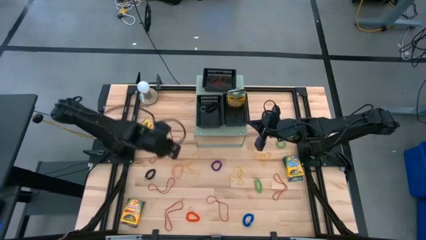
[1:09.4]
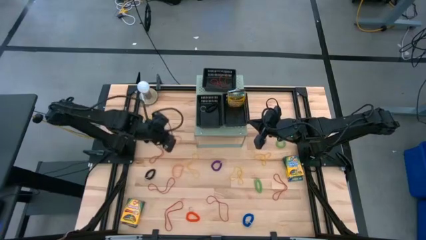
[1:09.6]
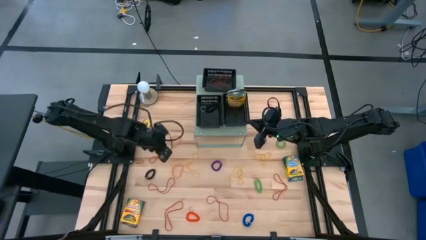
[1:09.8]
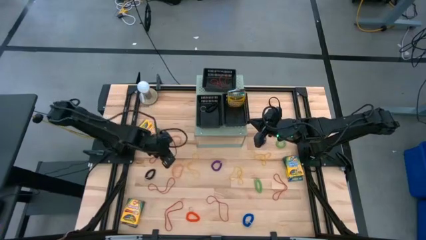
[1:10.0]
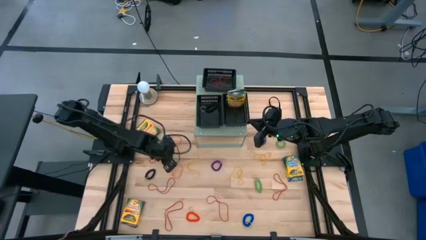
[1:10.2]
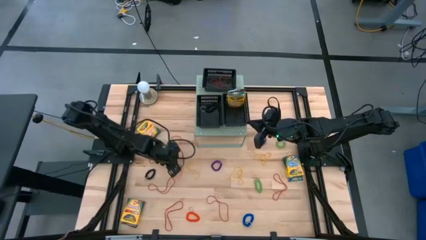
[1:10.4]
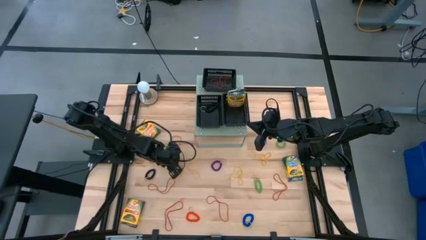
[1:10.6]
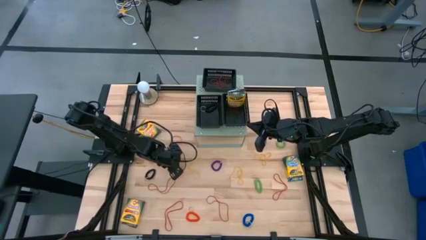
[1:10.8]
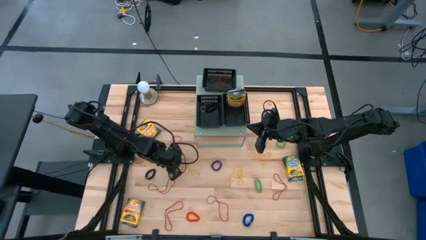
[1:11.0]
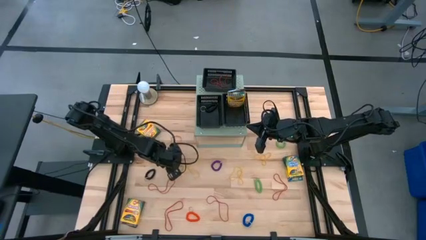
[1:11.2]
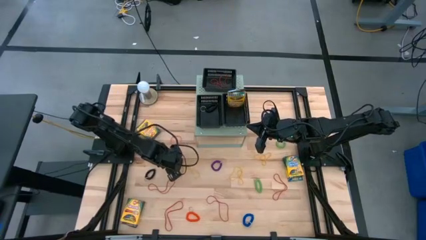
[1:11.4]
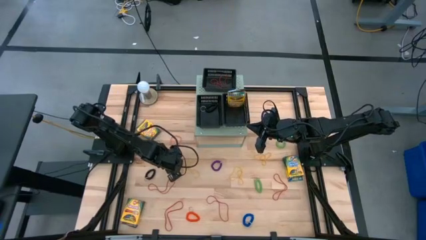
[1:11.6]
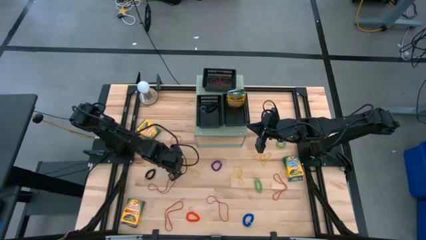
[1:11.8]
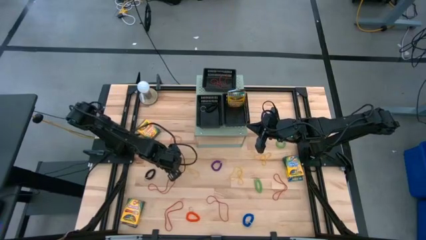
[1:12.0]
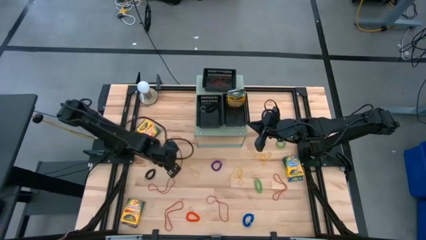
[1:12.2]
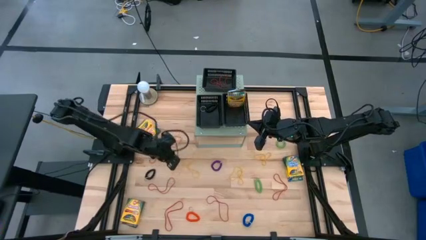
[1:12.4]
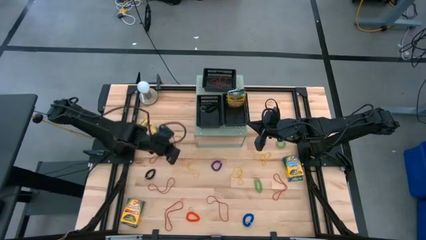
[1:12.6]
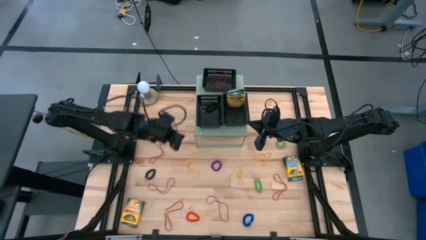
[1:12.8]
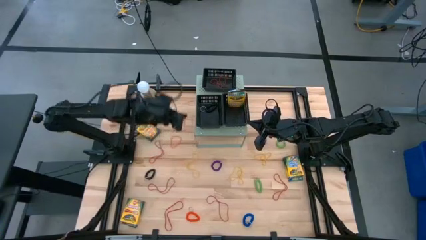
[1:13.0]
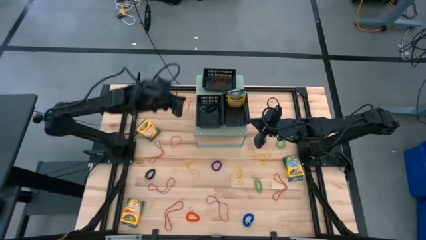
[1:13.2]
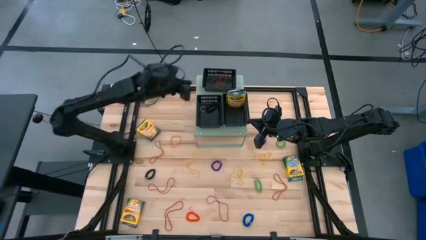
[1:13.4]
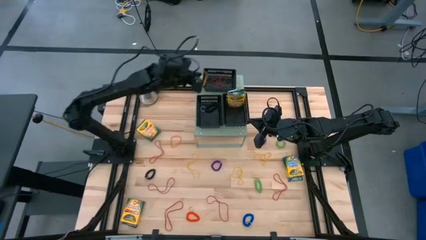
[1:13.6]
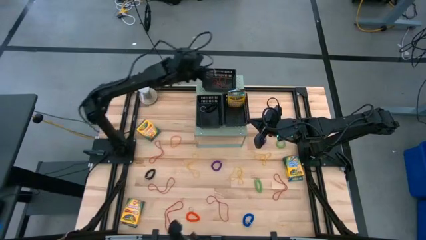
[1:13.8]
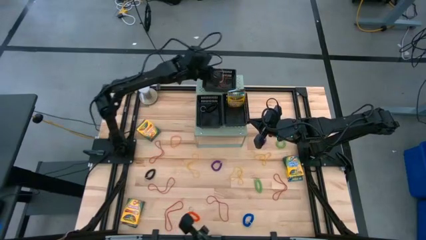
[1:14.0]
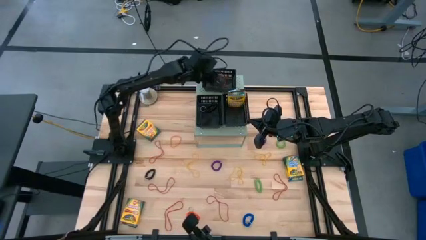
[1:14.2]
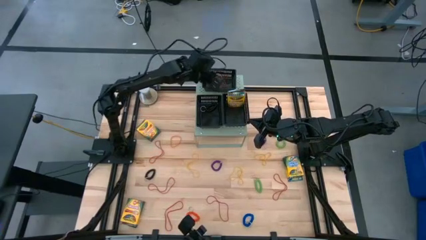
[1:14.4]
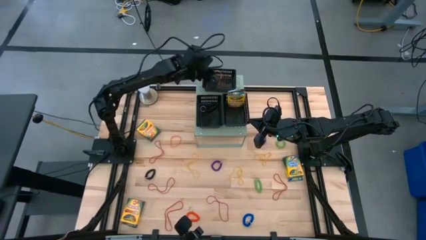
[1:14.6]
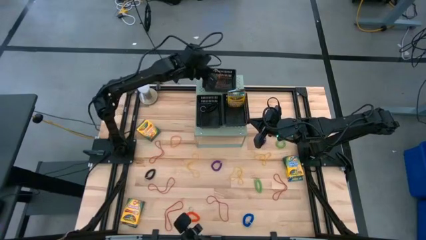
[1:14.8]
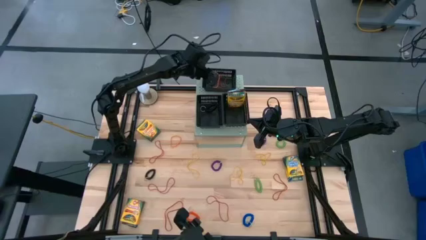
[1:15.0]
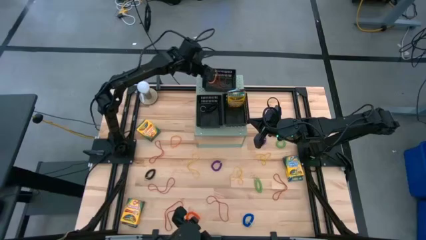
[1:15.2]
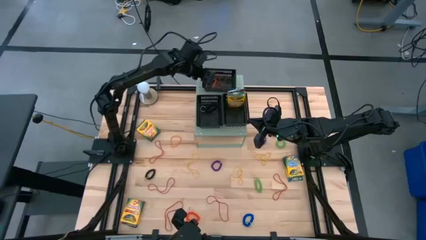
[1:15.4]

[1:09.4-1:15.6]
Task: Pick & Place Office Desk Supplies
Put the orange rubber band into the top black bin

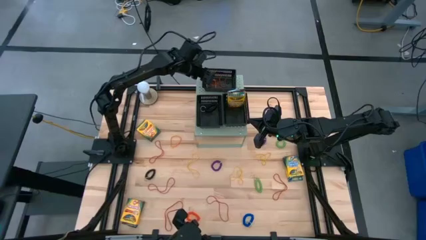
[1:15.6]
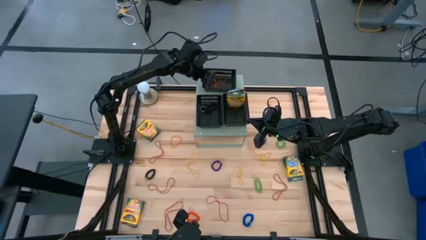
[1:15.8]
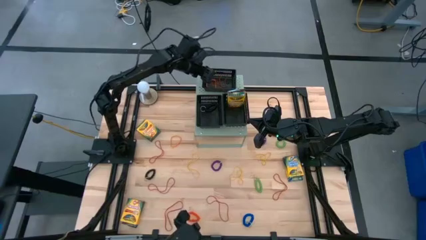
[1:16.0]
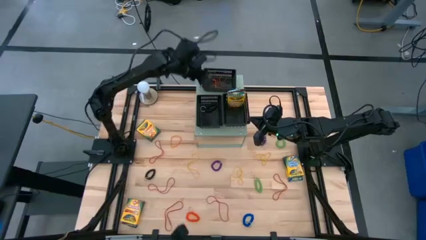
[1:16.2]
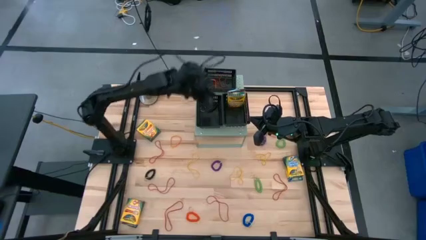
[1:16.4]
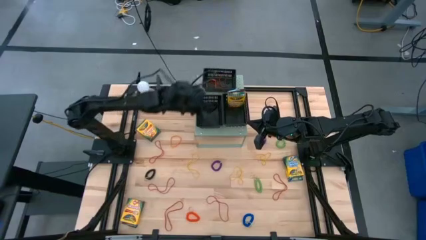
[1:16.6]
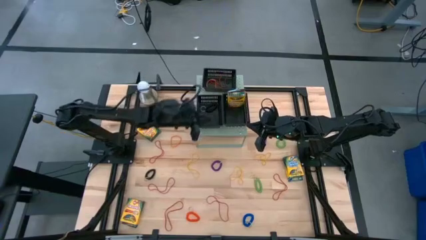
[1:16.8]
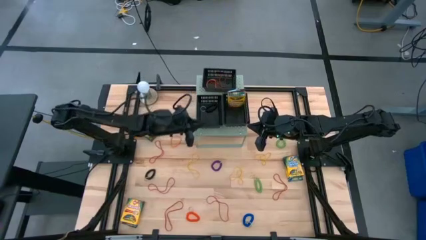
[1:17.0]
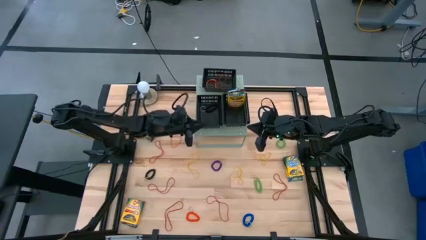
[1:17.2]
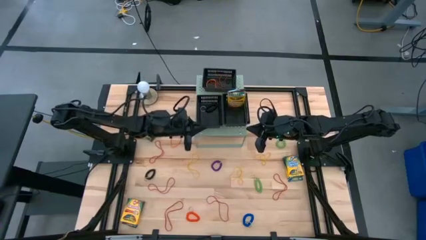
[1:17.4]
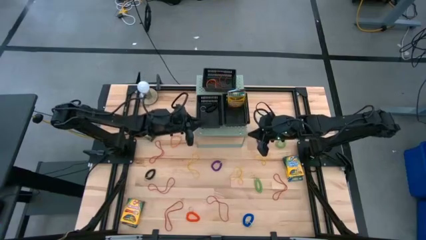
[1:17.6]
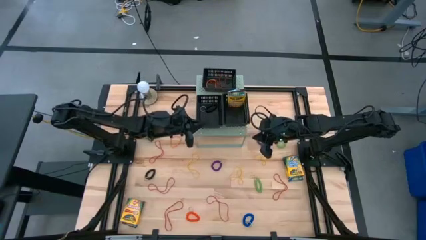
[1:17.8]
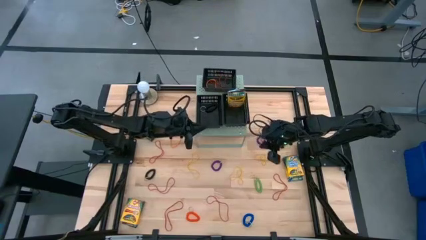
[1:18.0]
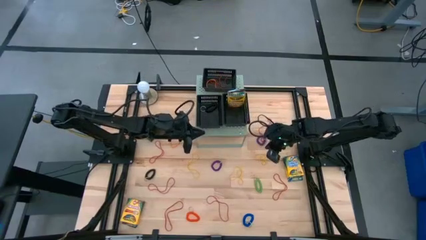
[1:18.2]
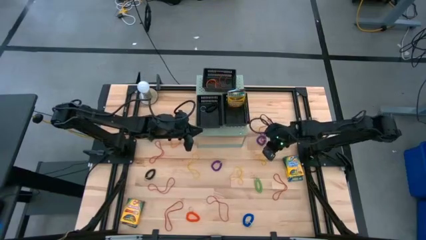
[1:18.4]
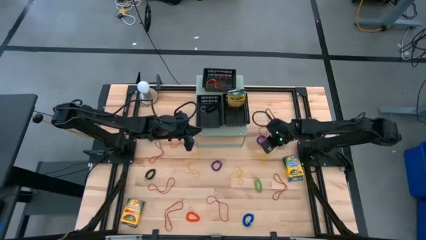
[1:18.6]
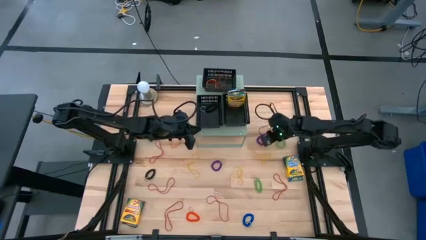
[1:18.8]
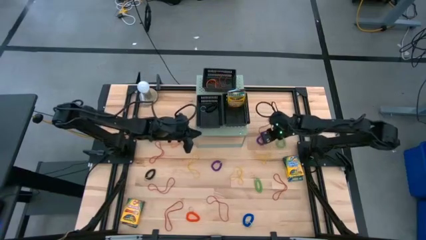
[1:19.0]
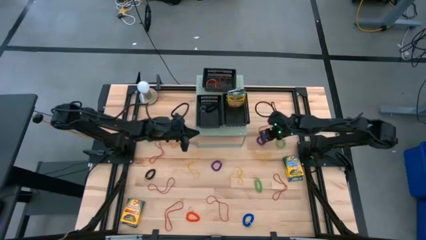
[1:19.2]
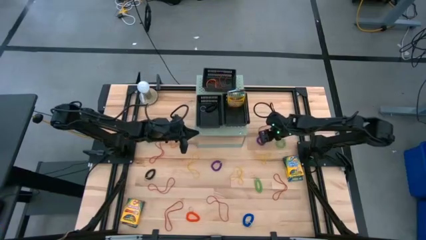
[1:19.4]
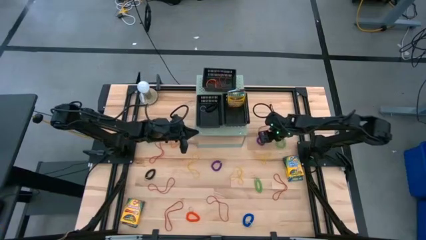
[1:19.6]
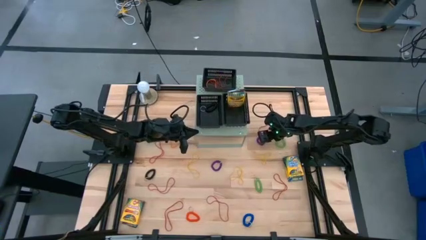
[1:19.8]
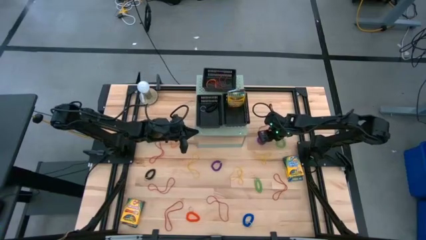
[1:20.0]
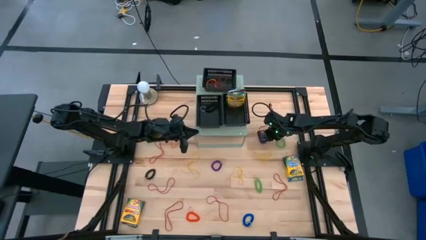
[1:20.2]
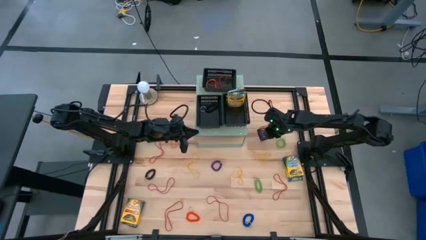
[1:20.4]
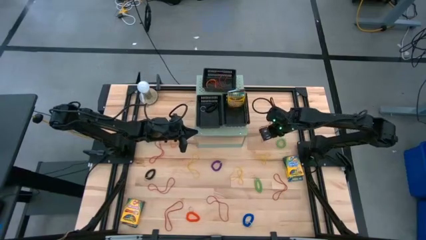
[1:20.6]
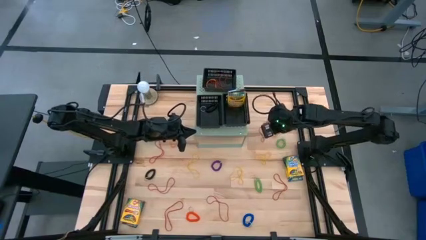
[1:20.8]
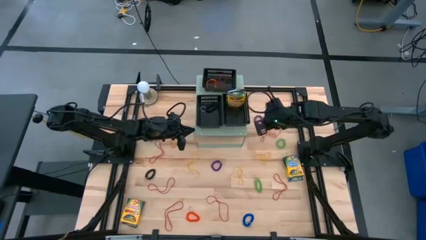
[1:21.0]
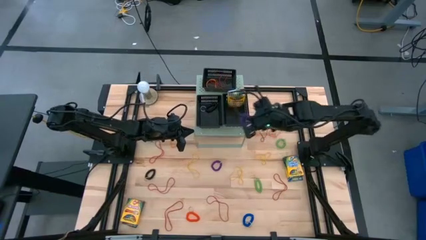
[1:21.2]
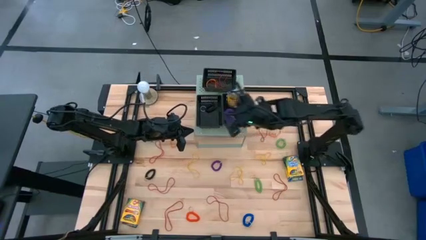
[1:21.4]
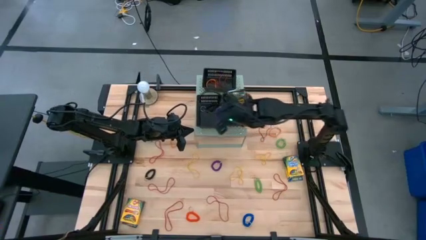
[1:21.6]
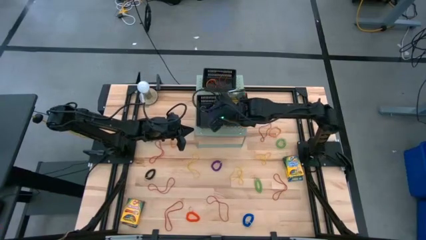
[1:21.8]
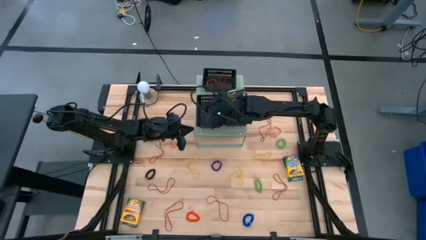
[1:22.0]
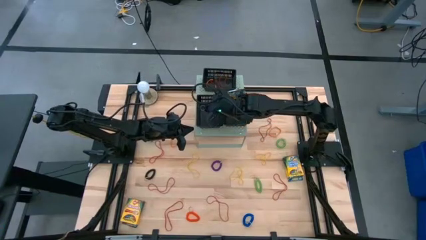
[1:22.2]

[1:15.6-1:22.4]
Put the violet spiral keychain into the bottom left black bin

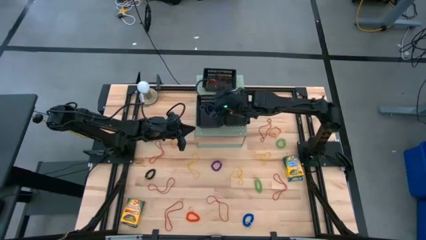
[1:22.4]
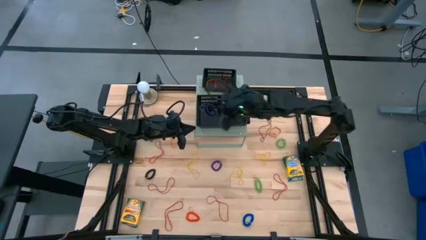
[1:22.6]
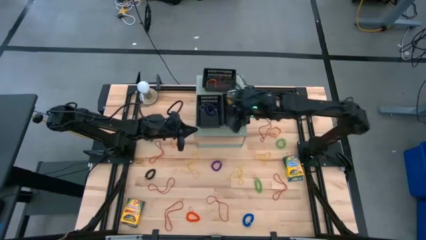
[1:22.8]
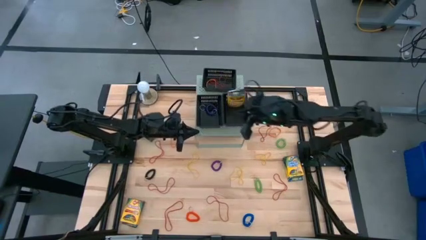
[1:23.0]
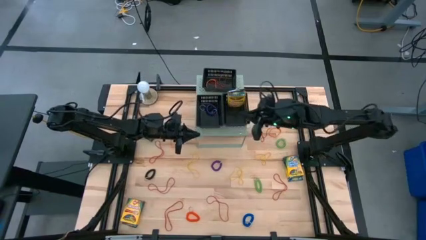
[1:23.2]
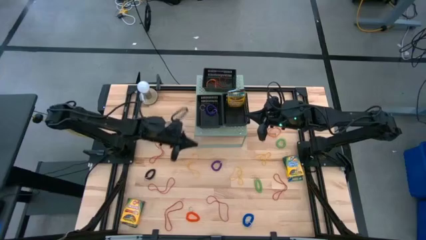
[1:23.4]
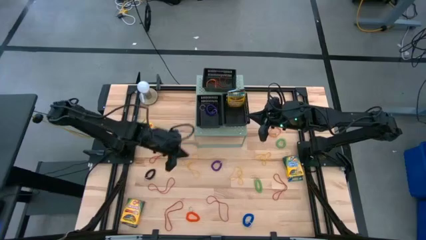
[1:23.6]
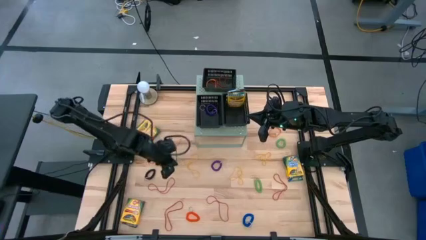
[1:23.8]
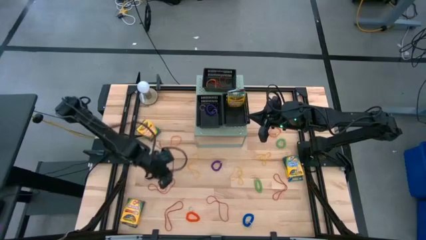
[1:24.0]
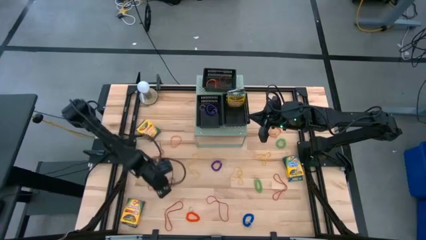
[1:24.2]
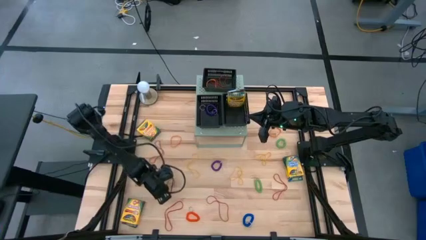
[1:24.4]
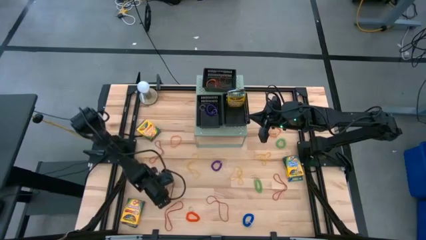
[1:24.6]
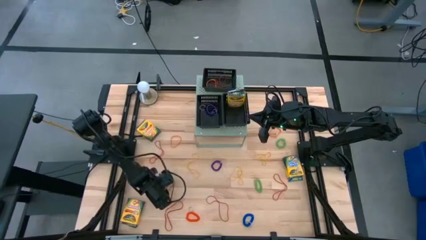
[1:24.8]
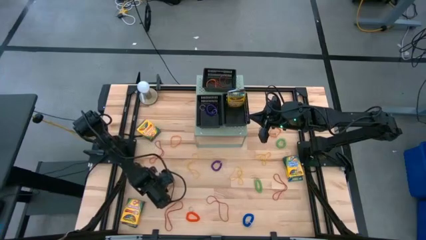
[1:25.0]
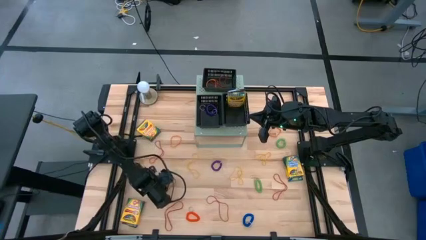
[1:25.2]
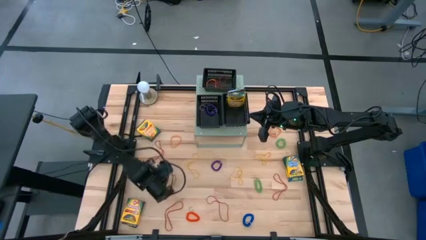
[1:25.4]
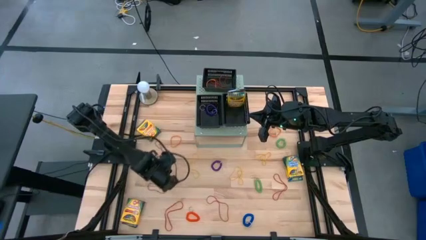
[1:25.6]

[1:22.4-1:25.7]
Put the red rubber band into the top black bin
